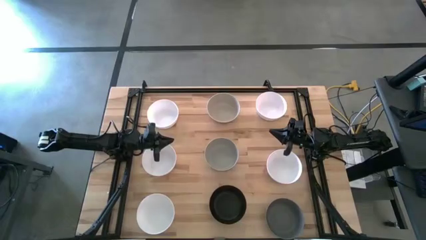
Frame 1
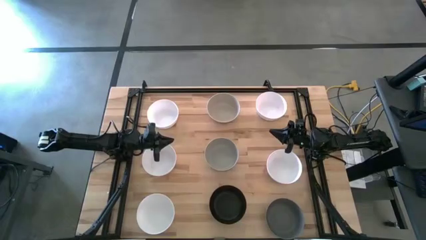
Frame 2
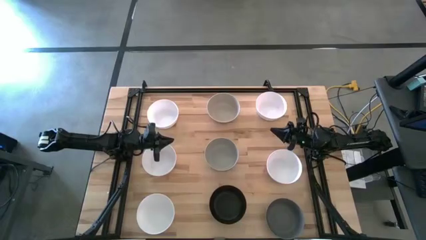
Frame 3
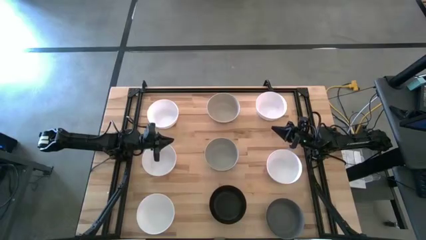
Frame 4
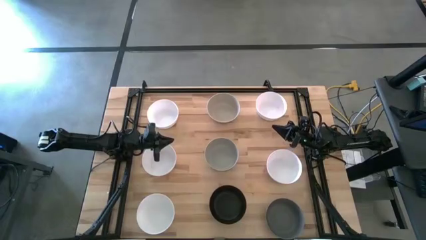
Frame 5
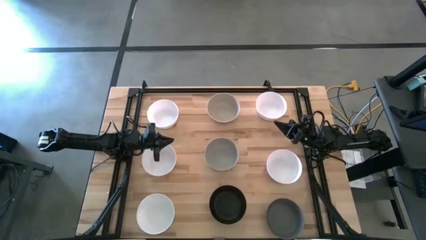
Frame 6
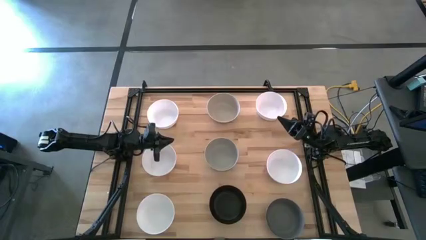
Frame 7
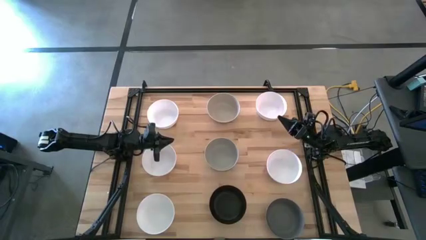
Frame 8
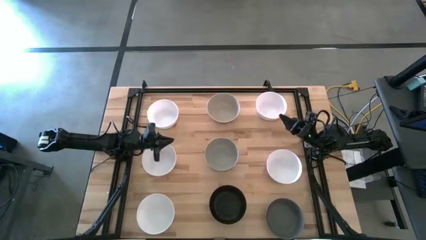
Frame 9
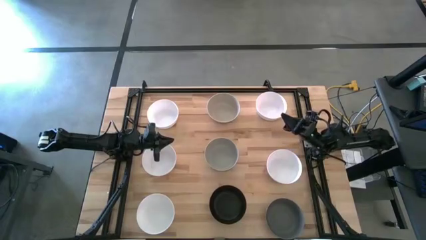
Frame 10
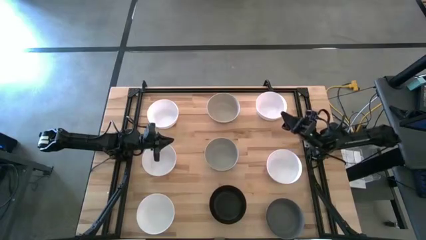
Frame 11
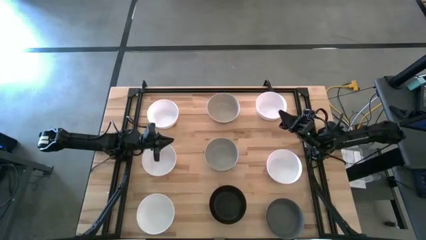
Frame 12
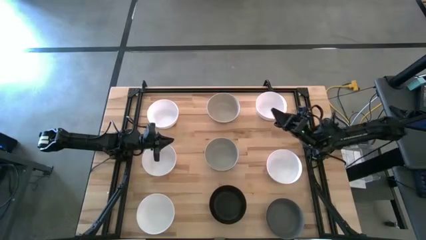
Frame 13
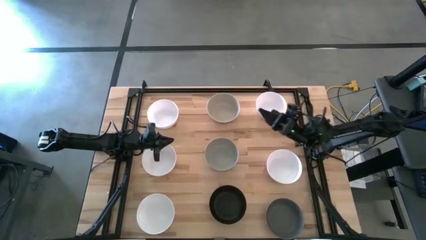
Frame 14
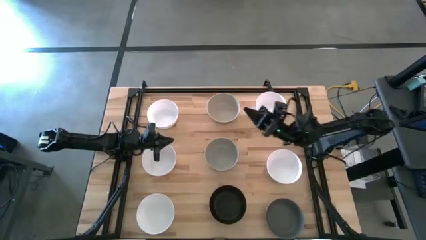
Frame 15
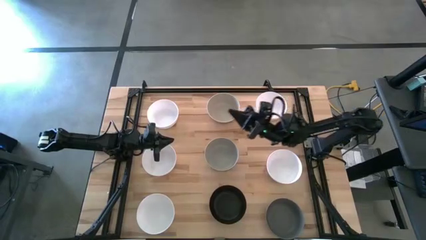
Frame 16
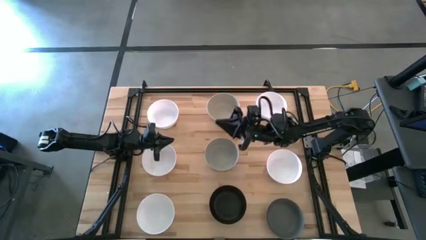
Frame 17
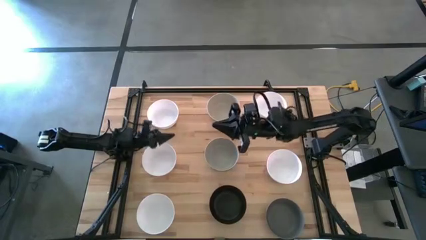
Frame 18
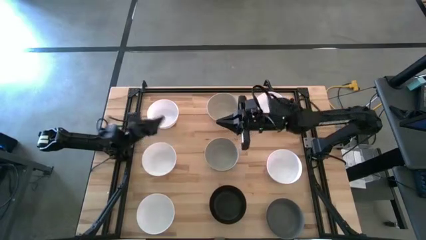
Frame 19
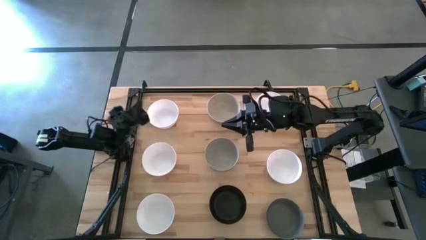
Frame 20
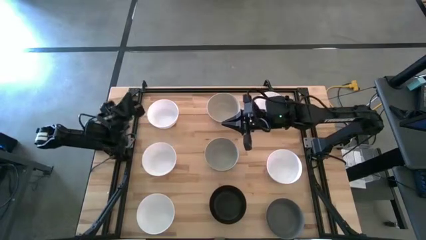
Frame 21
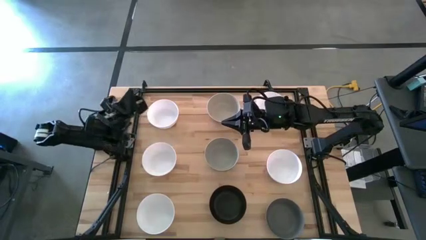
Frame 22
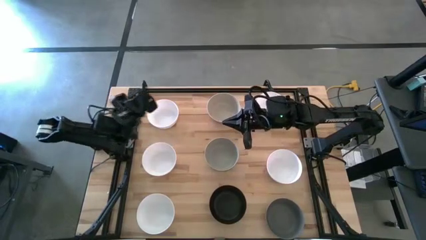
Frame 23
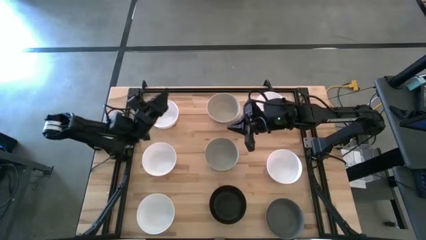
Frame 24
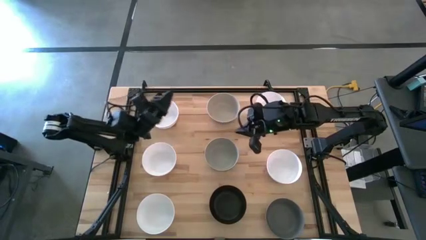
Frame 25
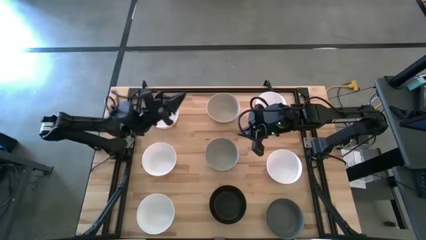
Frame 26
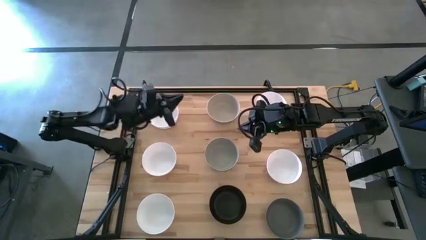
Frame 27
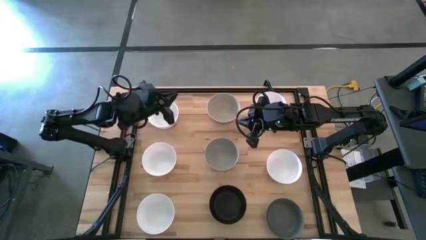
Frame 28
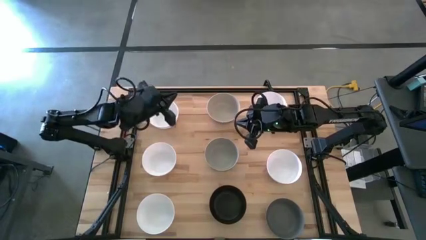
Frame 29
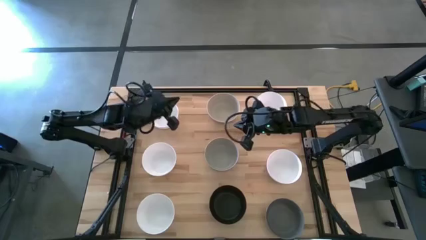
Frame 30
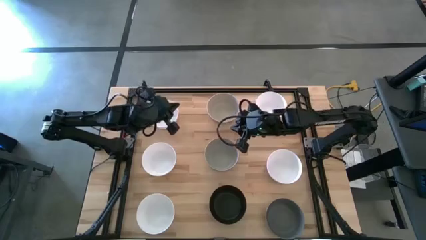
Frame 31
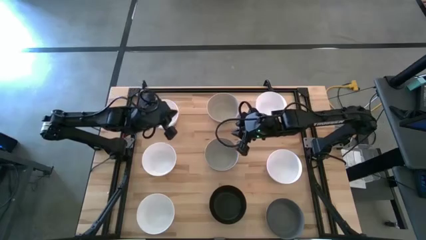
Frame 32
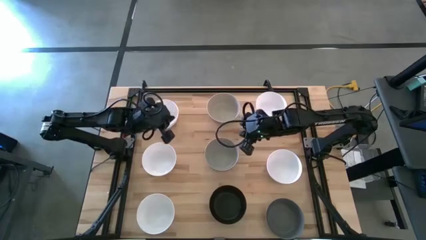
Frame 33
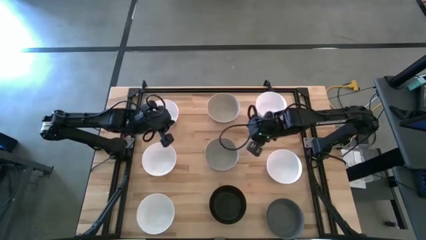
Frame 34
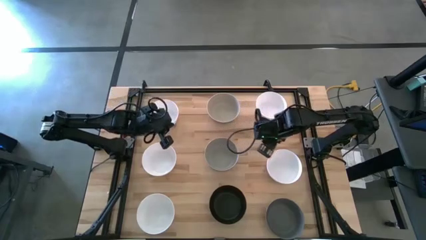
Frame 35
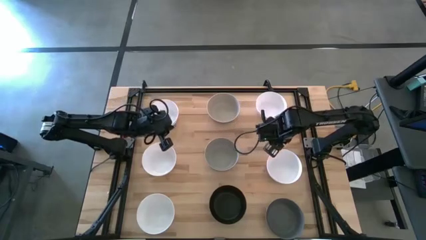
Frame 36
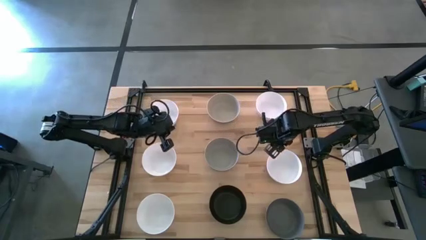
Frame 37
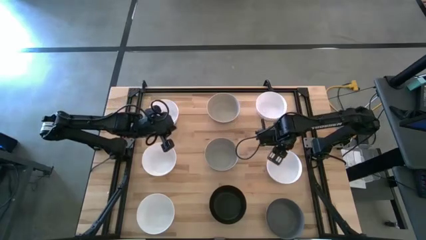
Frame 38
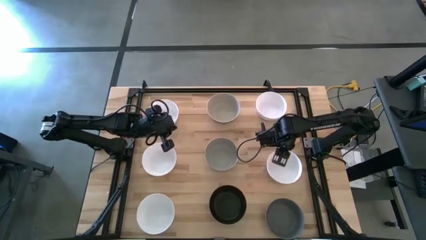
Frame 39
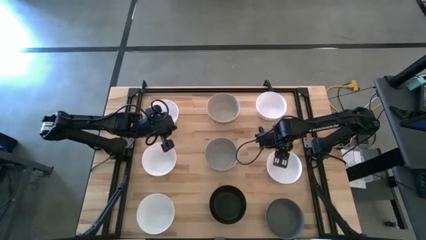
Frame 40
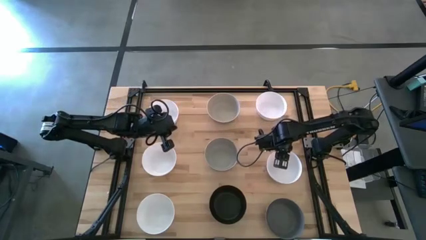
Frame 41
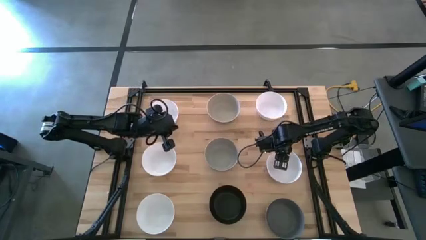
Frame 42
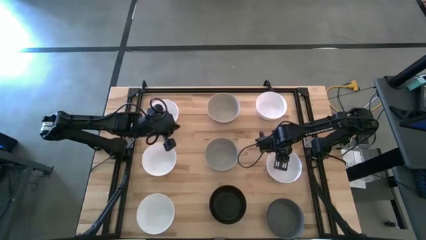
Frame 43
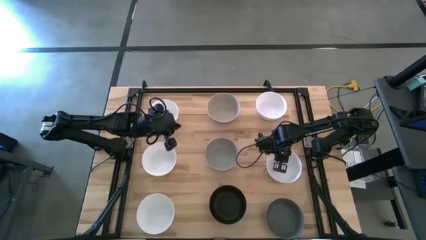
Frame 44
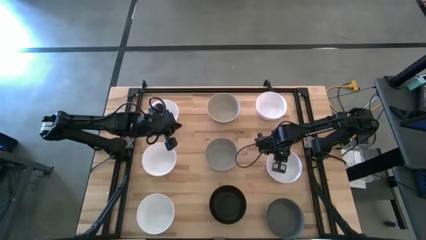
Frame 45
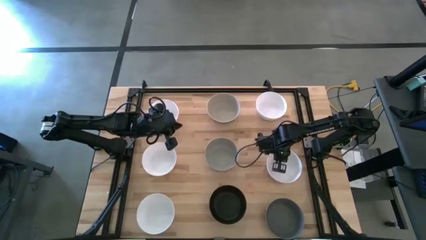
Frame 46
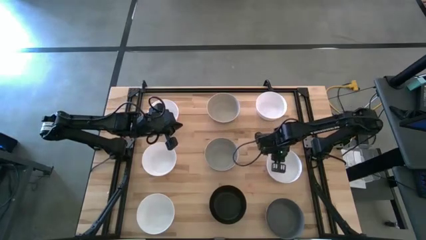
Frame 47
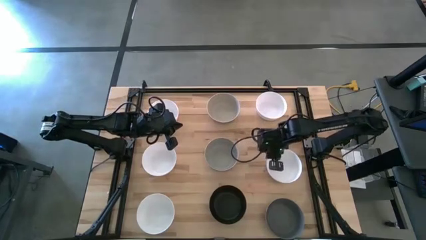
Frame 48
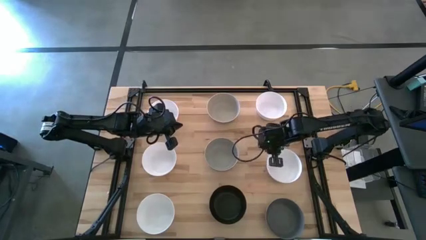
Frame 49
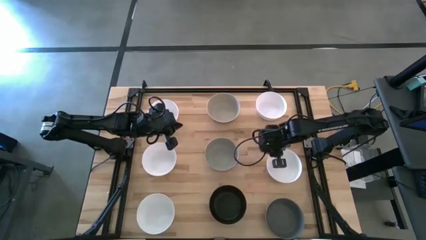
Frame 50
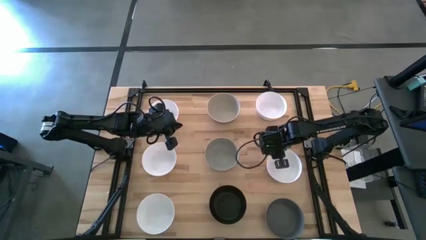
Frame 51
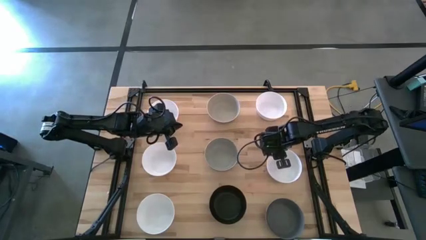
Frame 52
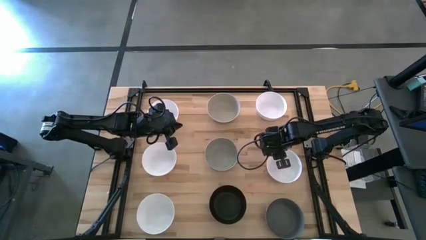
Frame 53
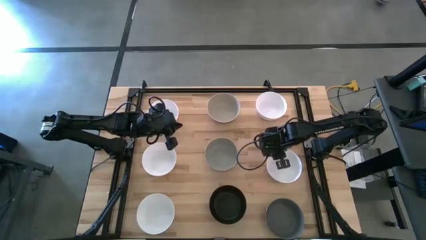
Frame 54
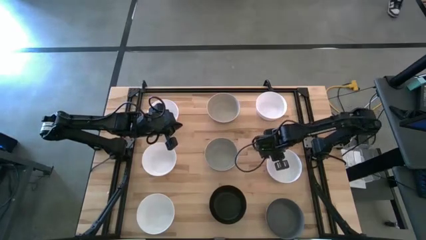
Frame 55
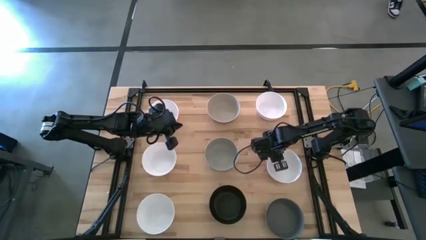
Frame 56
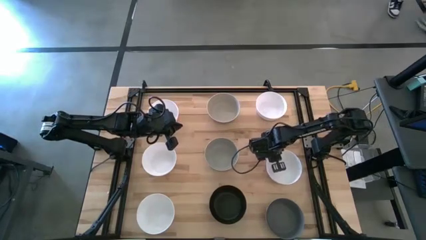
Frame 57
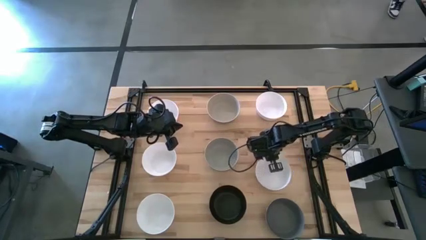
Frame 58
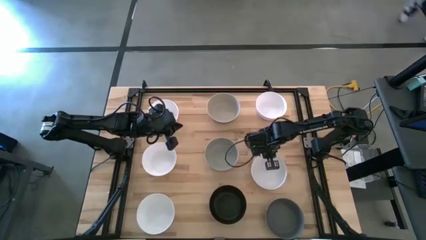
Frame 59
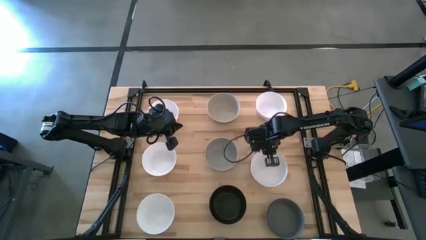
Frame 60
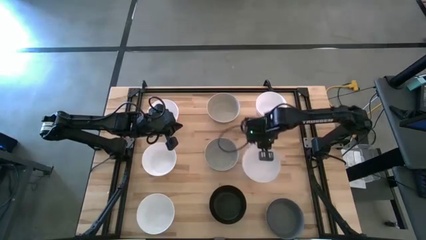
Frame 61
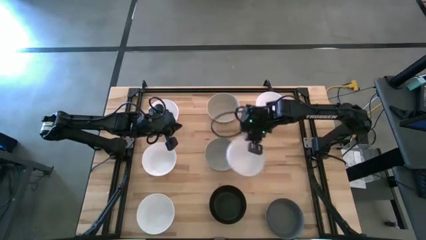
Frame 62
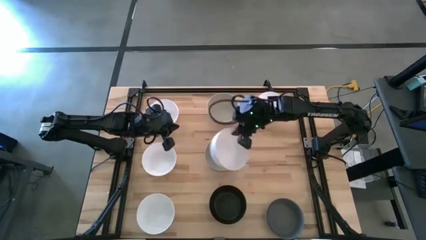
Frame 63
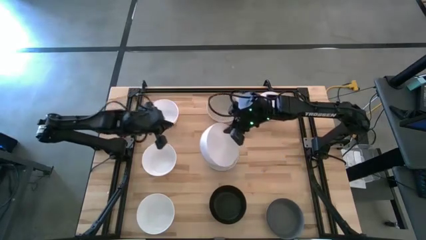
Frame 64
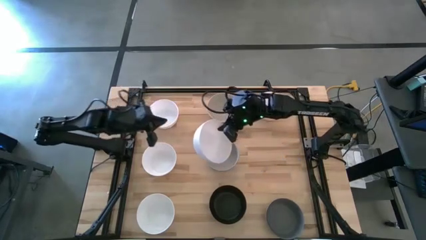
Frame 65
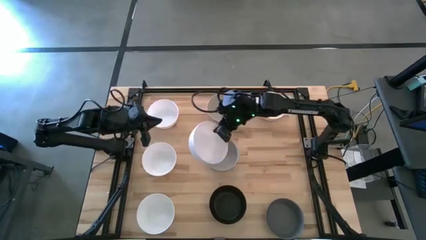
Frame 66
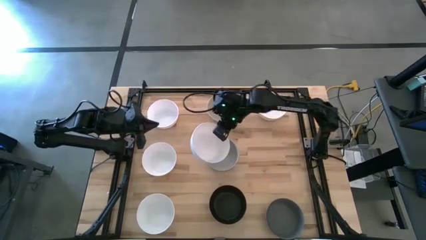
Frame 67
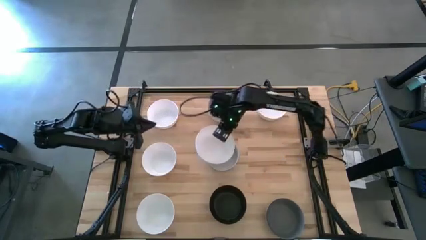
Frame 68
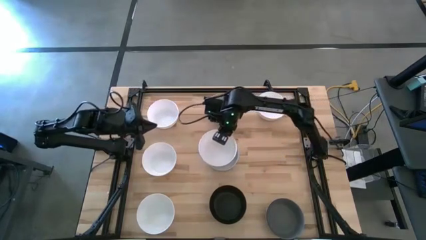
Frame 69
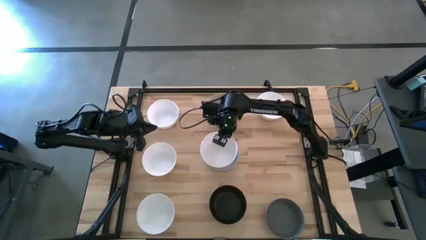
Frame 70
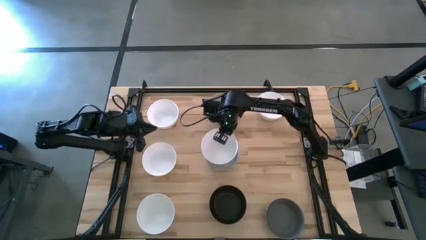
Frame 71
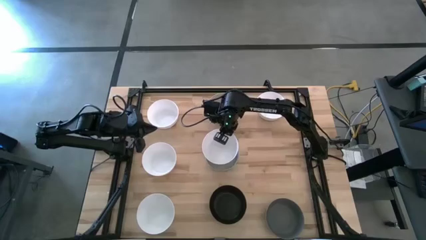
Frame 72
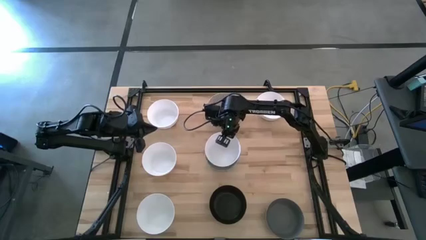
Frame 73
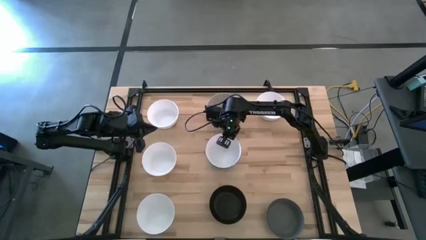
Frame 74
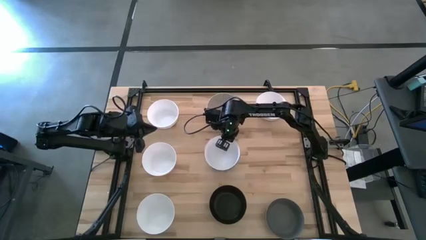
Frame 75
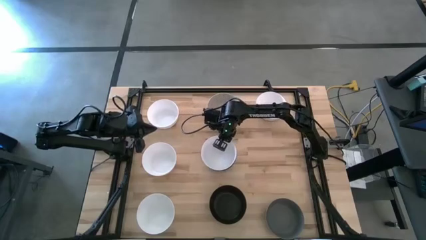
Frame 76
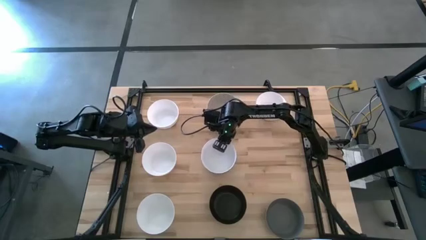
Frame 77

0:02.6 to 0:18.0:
Task: Nest bowls inside each other
Stack the white bowl on the center gray bowl
